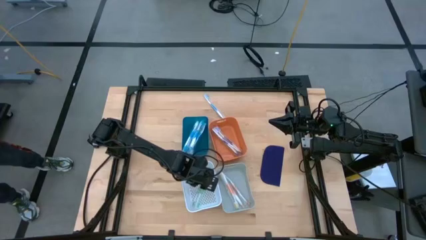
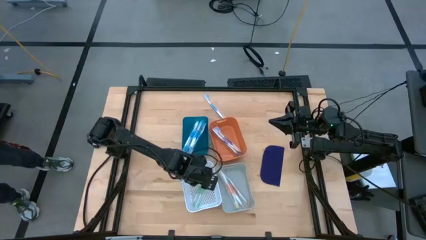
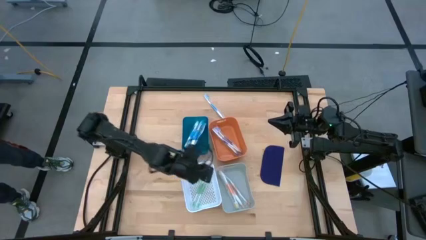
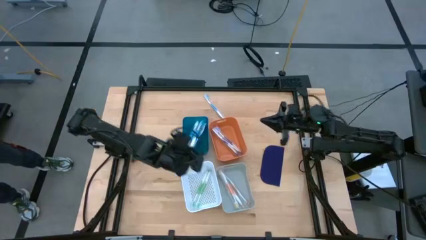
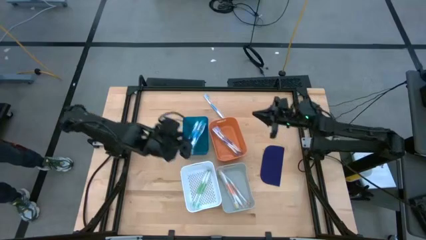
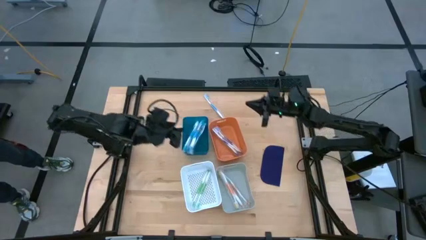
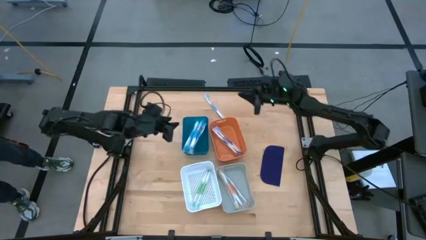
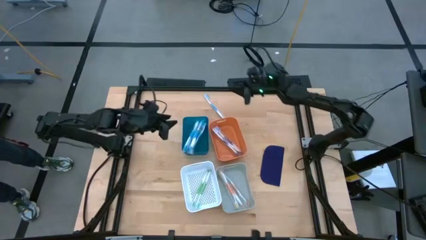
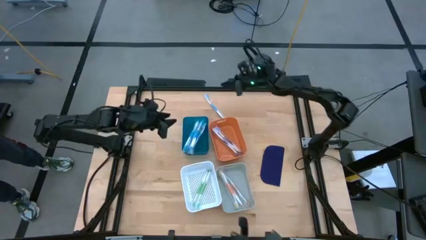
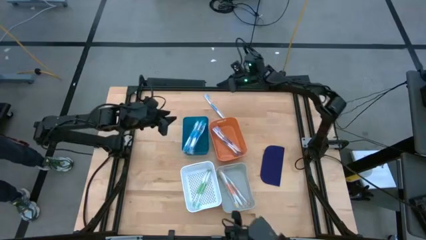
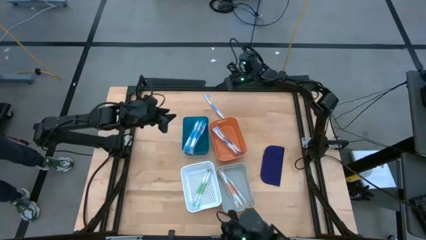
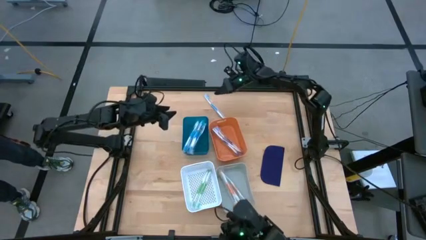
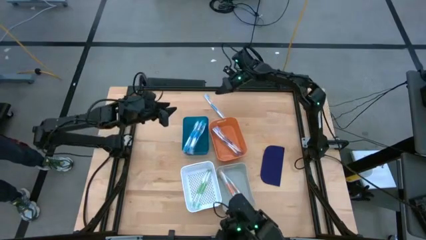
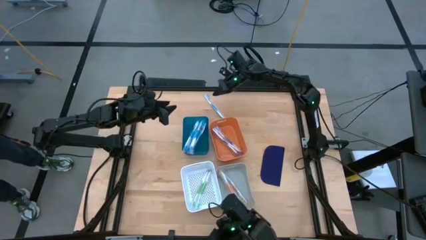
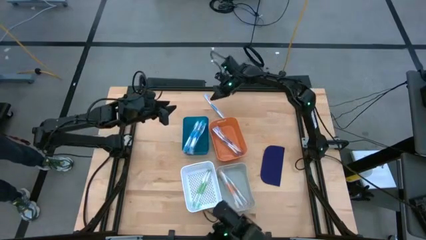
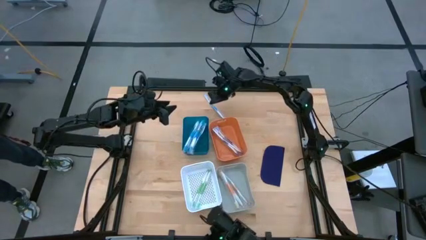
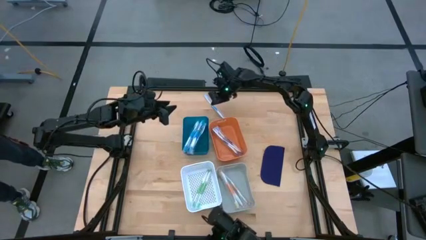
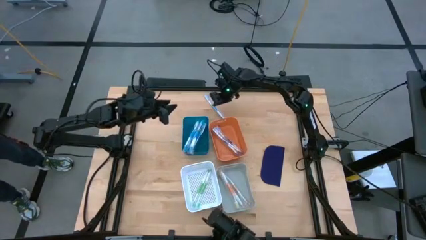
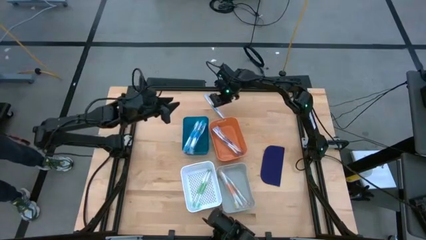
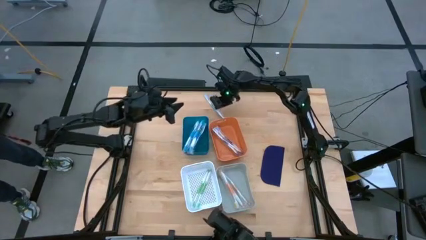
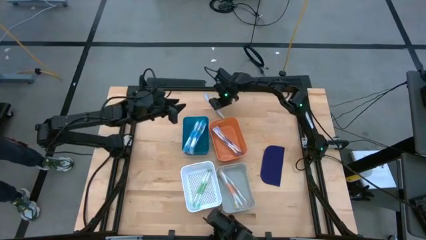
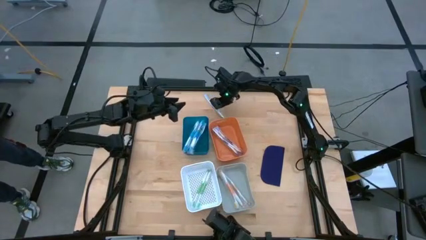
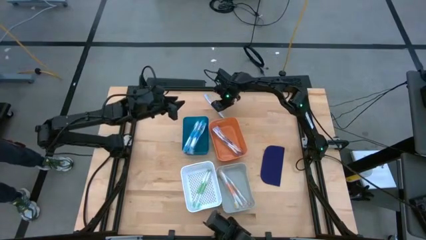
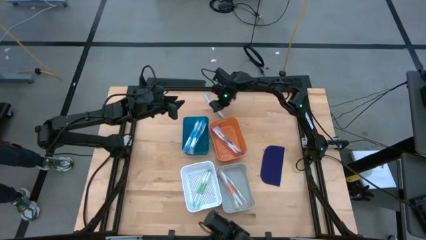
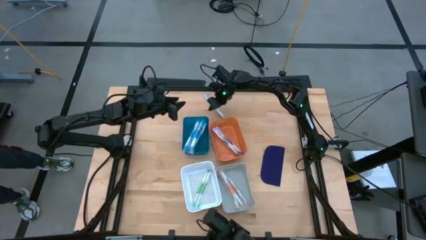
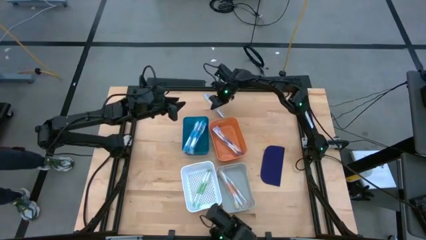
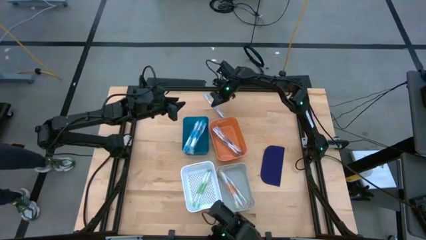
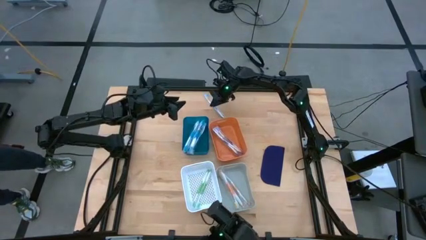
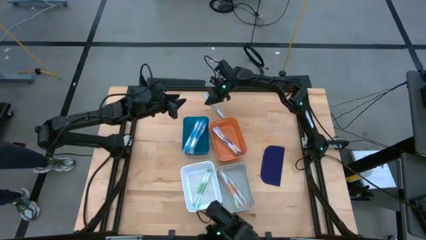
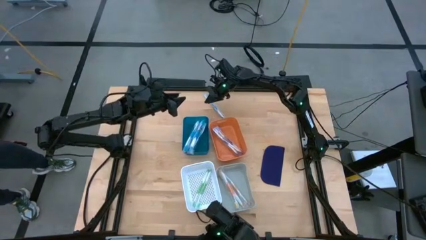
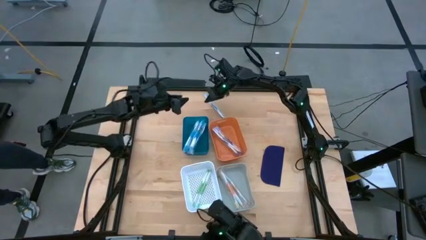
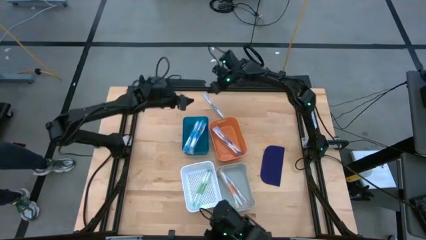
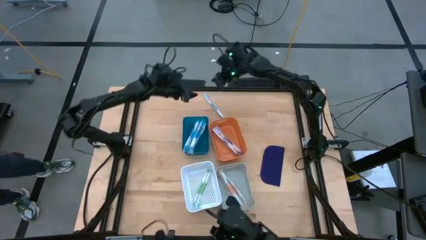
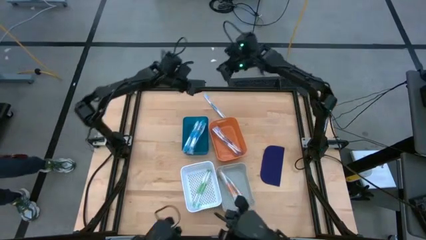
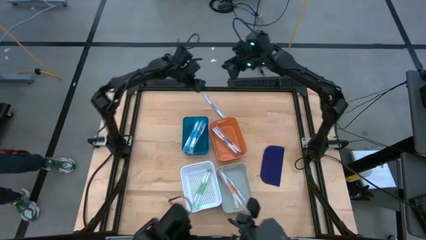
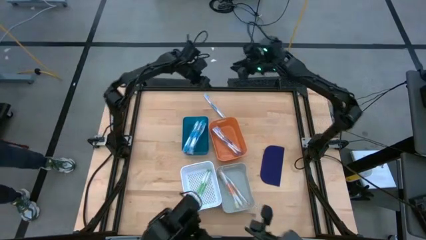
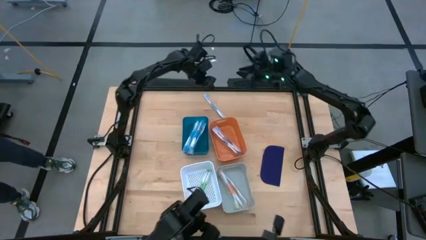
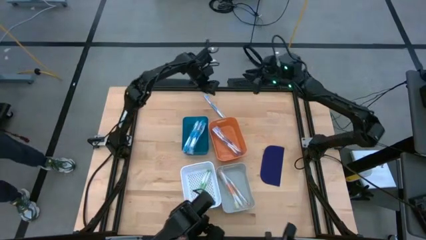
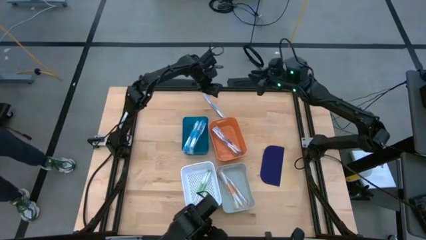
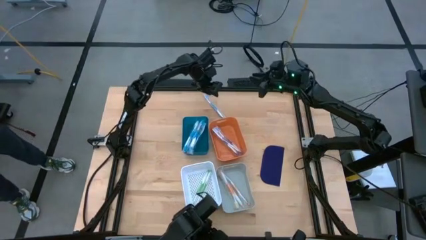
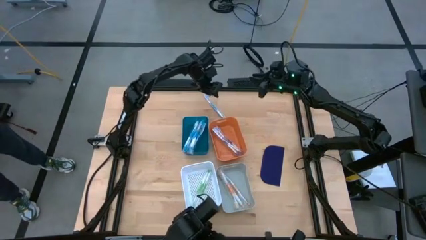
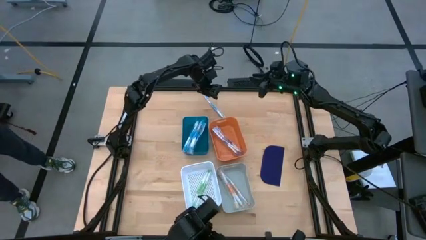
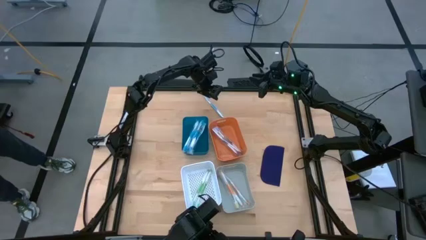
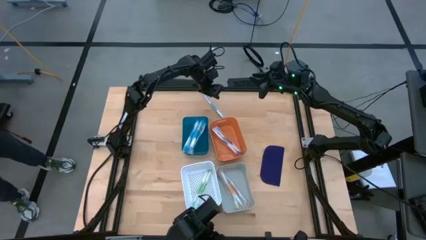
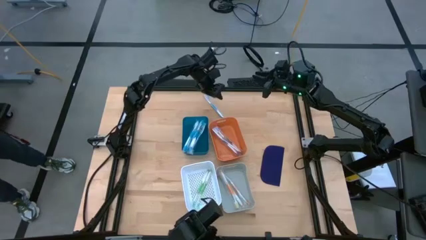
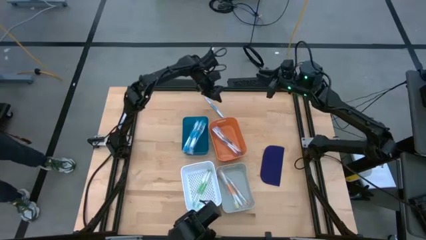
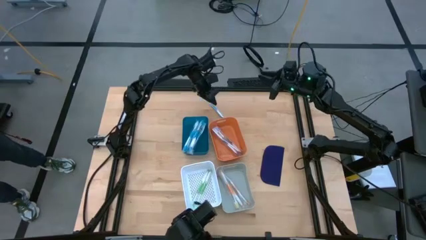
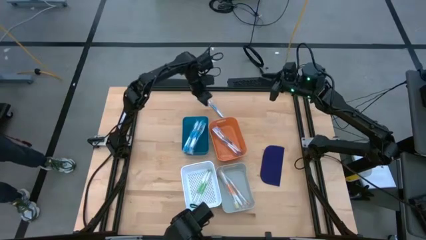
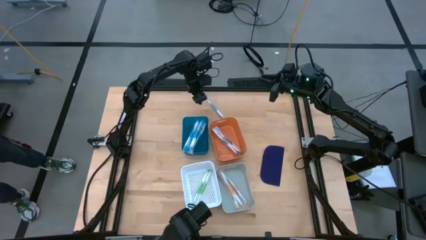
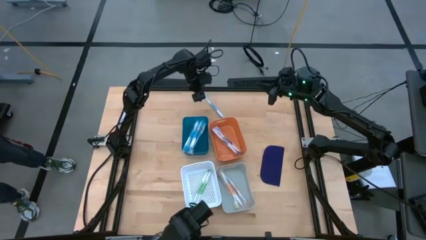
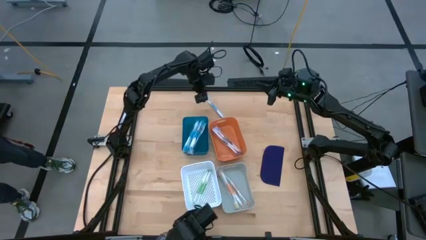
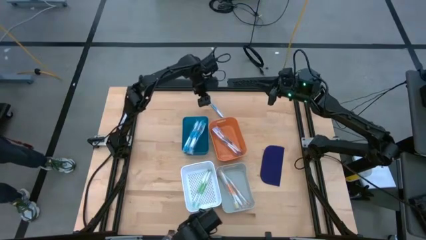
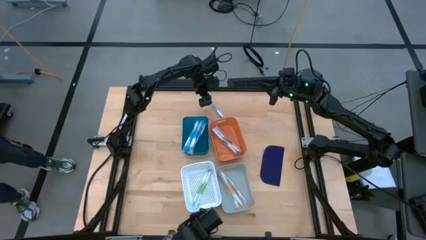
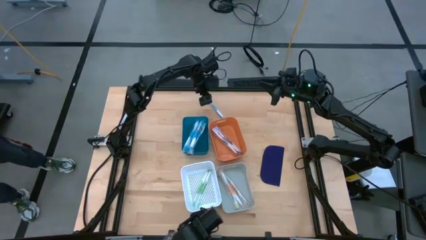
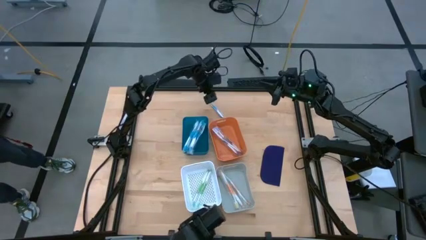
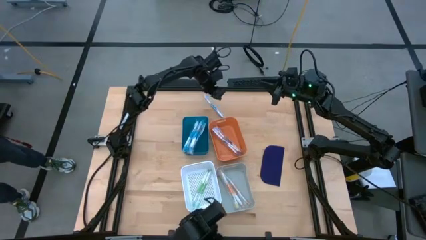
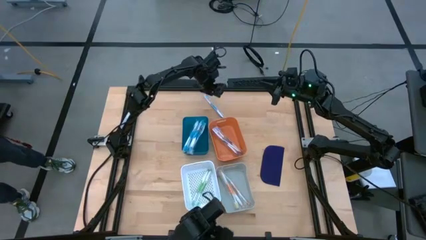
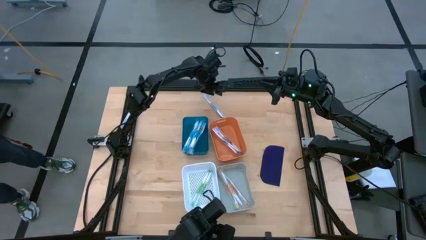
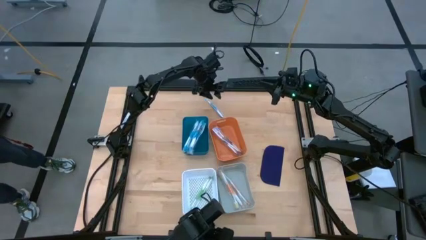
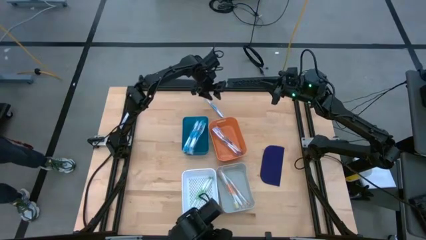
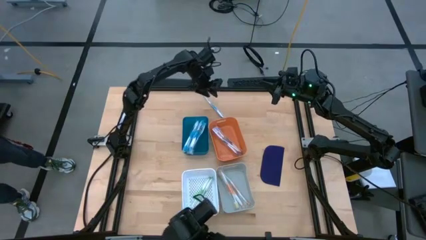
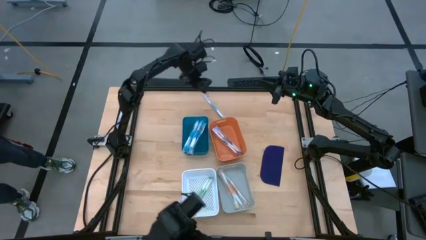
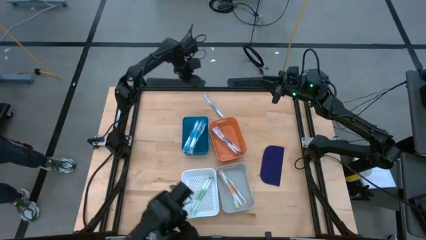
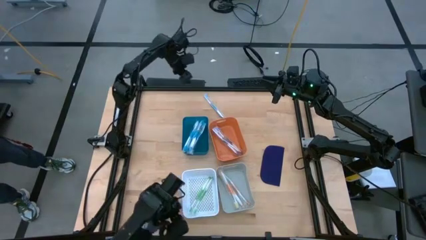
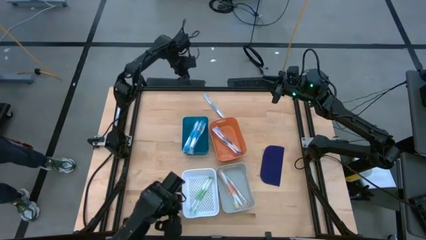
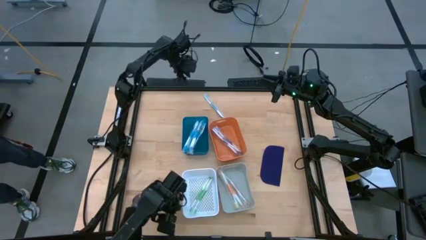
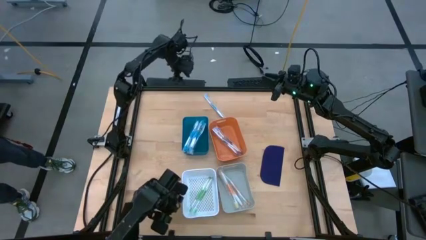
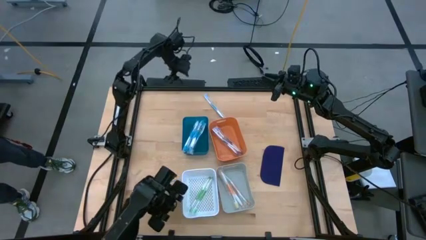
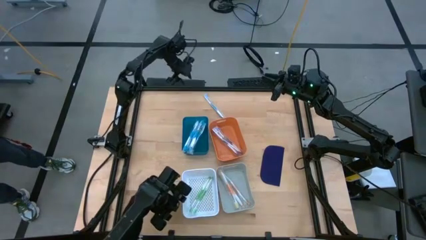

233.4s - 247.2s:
Task: Pick & Place Toothbrushes
Adjust the blue toothbrush on the blue bin

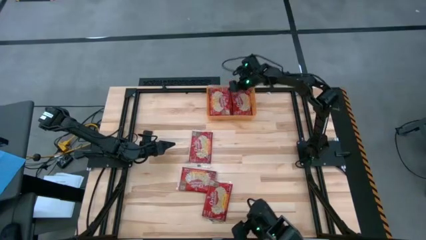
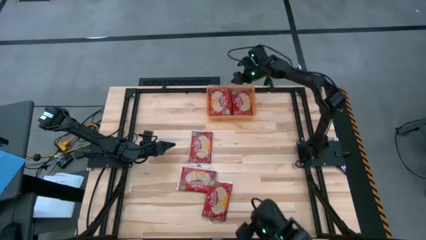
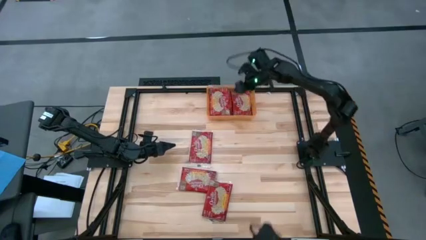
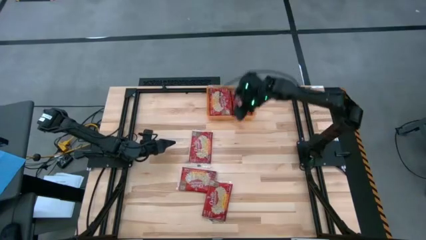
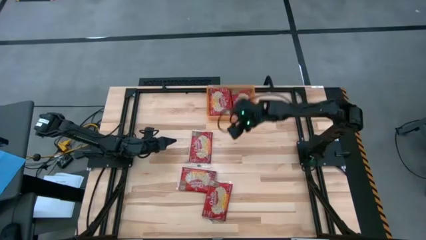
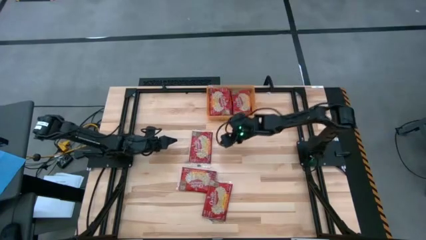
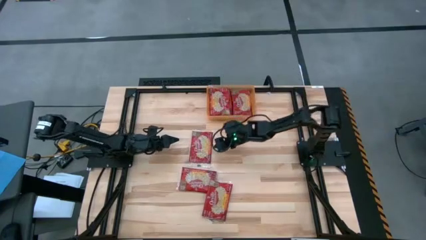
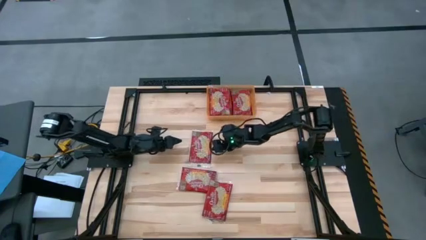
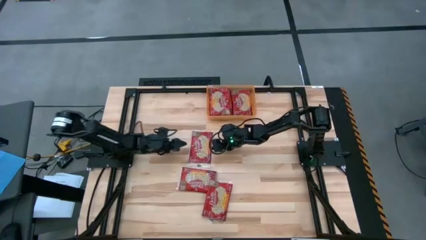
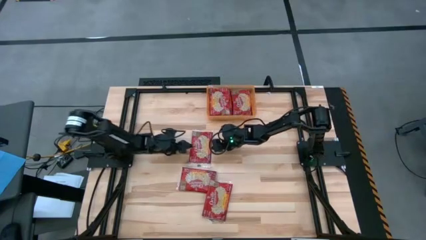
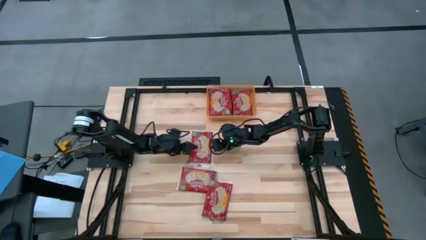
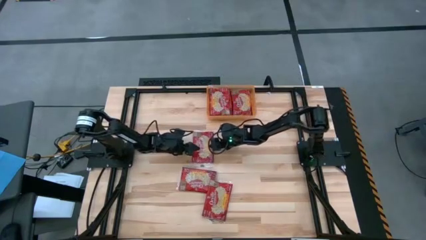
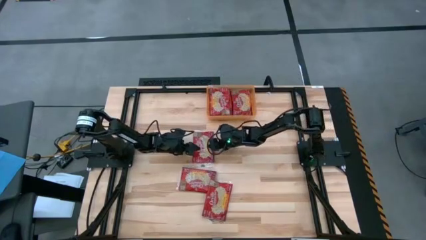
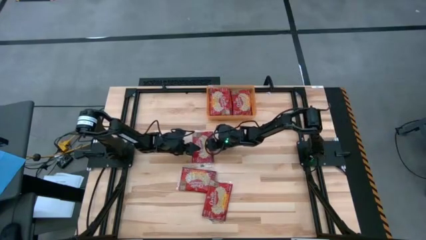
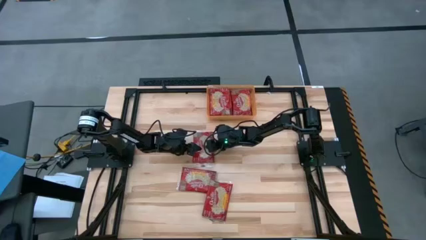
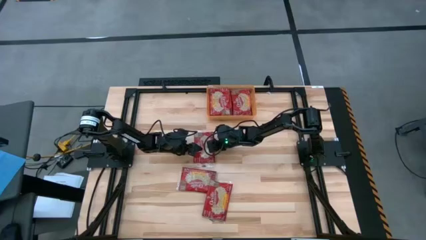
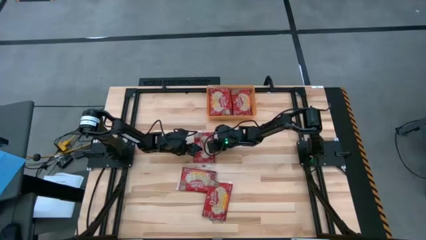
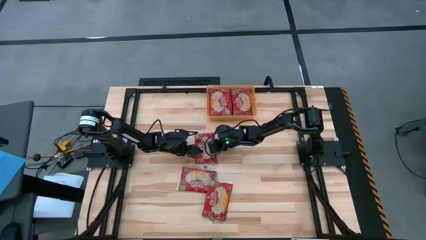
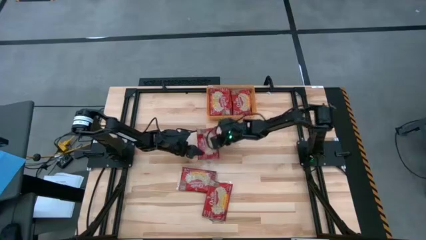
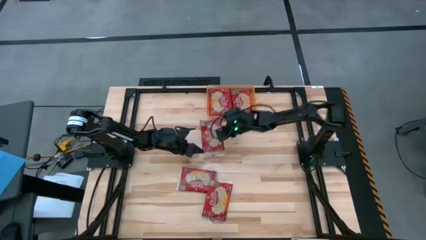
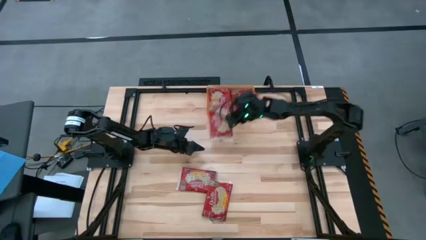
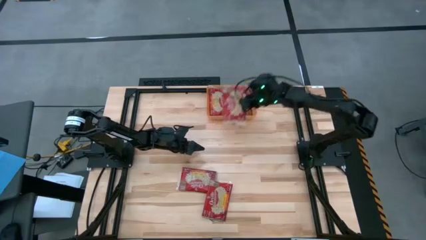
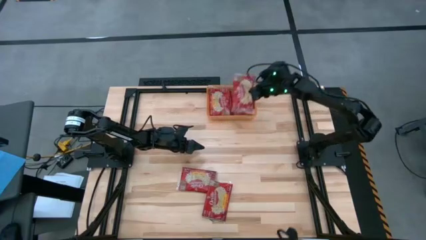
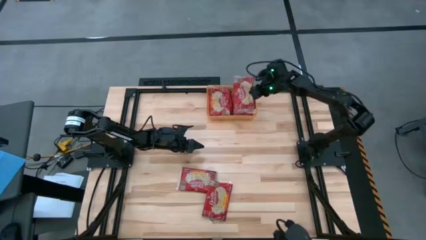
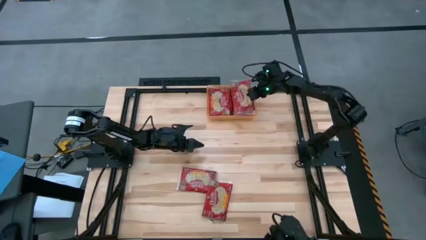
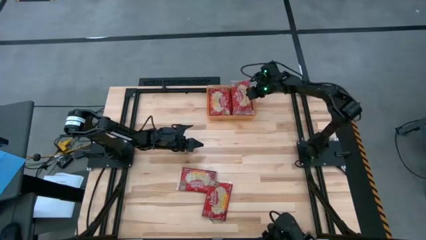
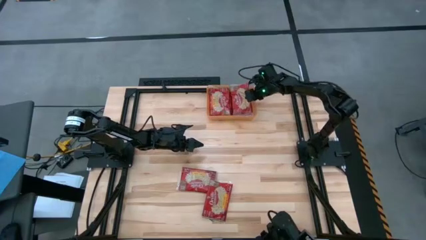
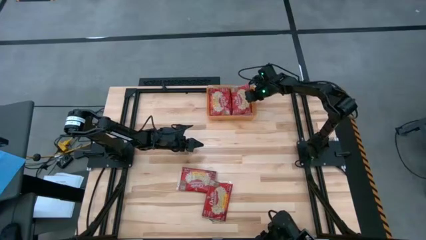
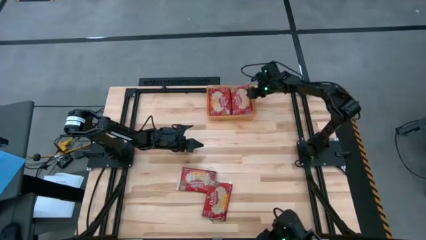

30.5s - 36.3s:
Task: Sort popcorn bags into baskets
Put the red popcorn bag into the orange bin
